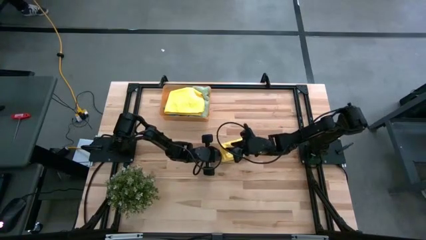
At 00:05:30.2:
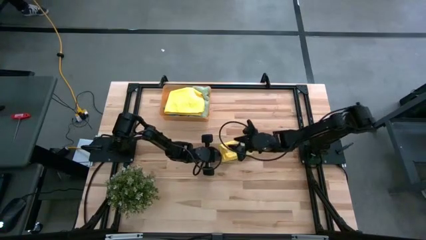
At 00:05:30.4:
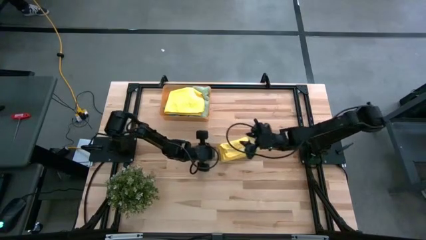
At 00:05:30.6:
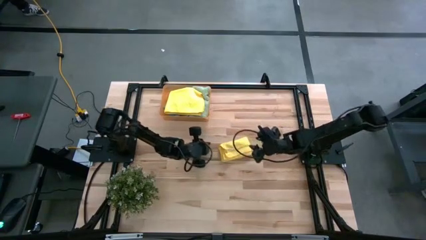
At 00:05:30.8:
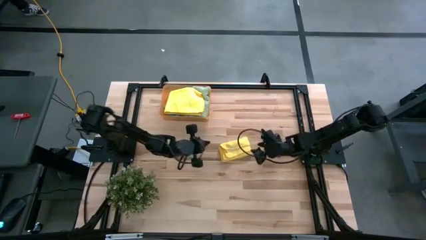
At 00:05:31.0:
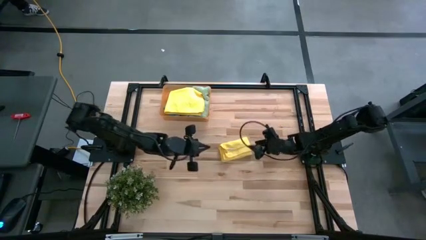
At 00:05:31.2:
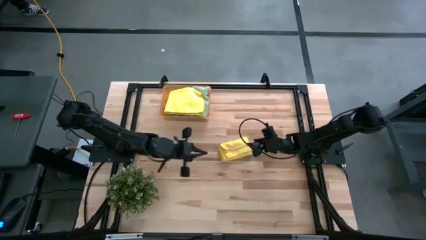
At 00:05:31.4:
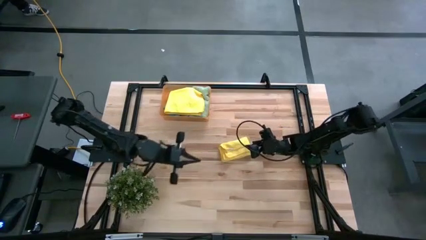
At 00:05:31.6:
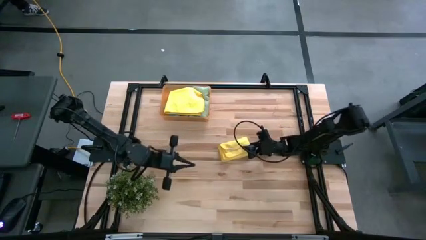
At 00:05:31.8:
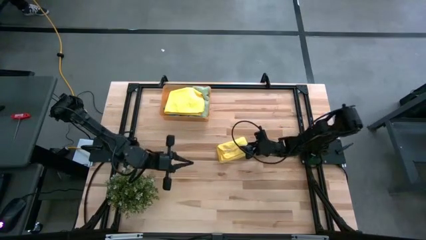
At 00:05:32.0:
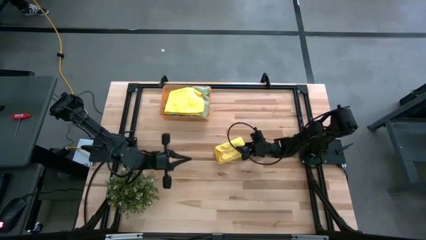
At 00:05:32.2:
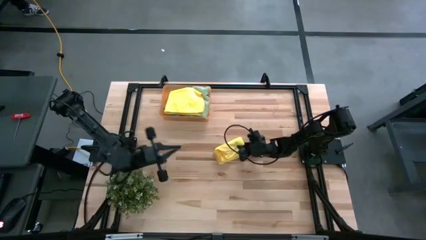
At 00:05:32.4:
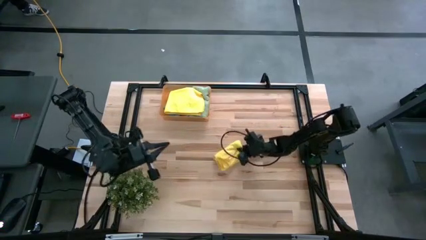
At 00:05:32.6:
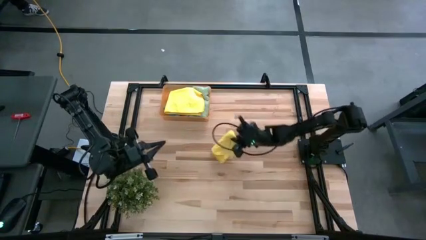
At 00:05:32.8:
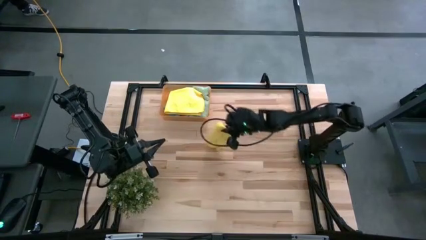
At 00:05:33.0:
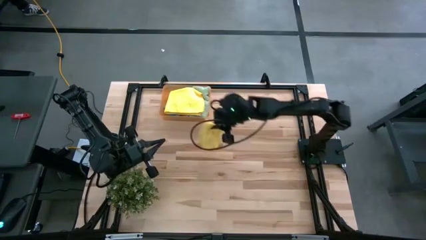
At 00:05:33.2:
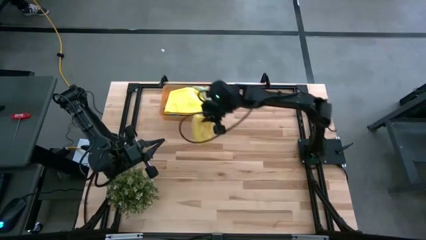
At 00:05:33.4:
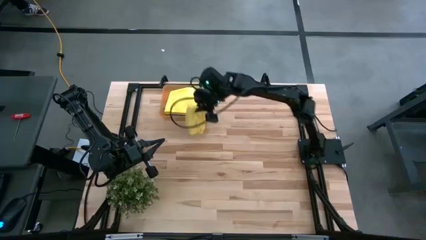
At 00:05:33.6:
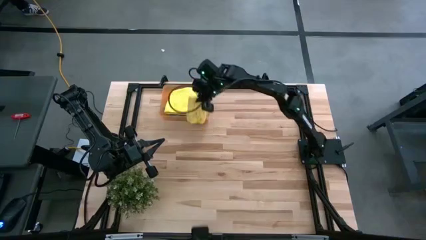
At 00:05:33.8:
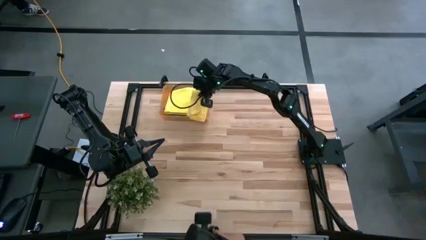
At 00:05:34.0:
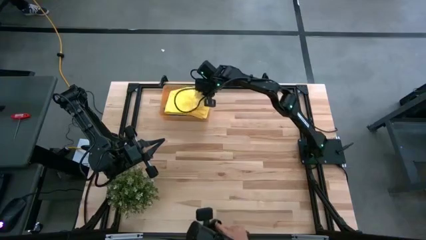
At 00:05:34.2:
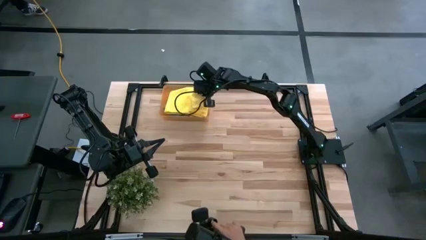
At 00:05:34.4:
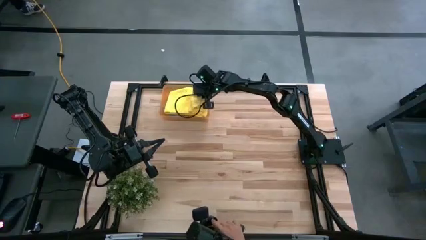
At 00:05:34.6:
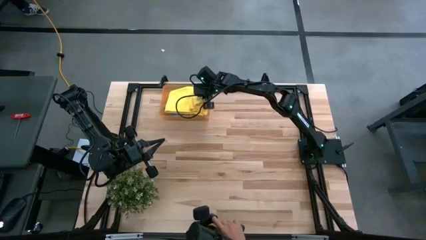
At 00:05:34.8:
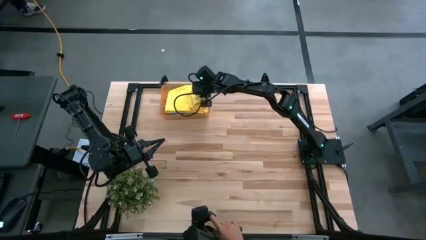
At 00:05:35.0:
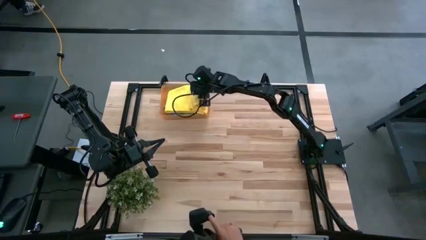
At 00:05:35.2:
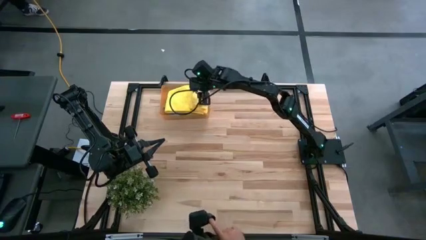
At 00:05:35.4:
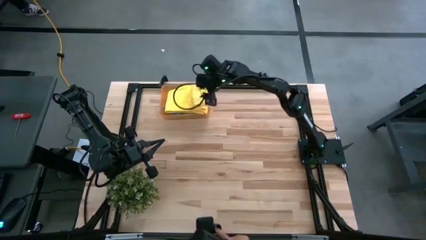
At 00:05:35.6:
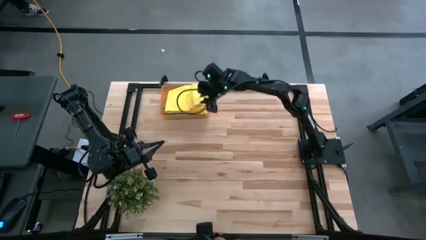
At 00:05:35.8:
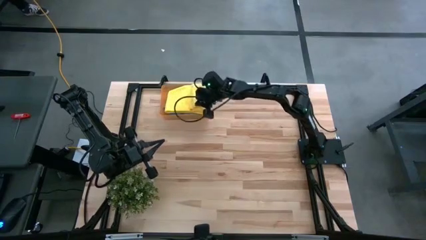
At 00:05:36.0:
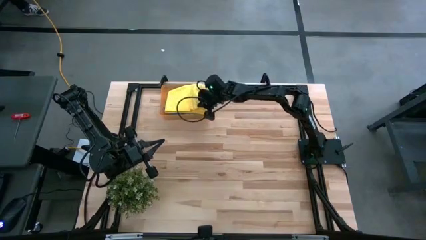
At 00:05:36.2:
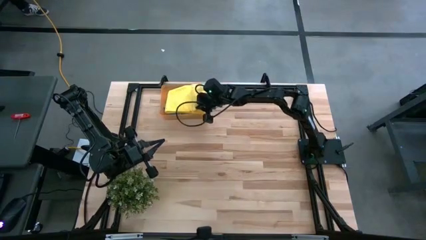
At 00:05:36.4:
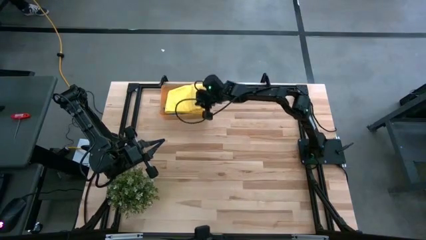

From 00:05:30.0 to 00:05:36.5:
Task: Fold microfiber towels
Put the yellow microfiber cloth into the orange bin

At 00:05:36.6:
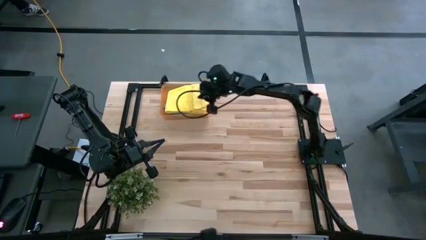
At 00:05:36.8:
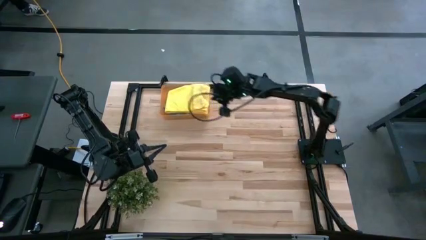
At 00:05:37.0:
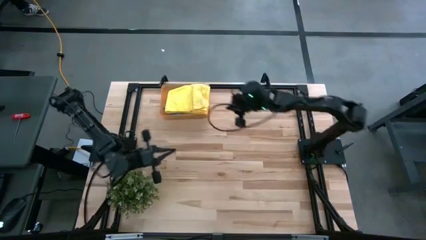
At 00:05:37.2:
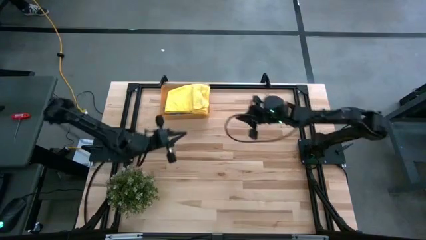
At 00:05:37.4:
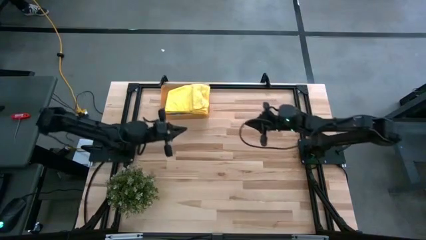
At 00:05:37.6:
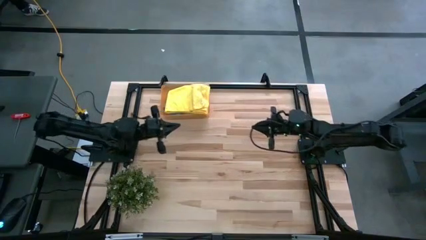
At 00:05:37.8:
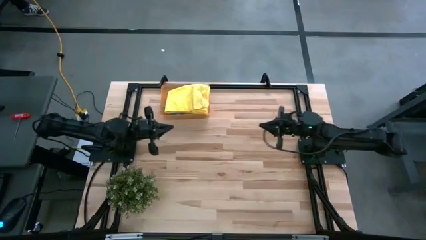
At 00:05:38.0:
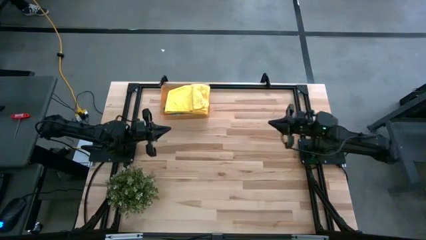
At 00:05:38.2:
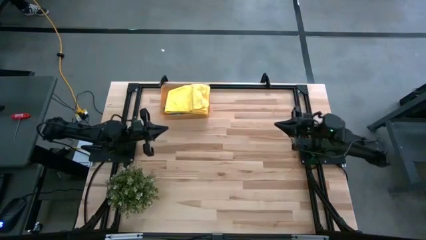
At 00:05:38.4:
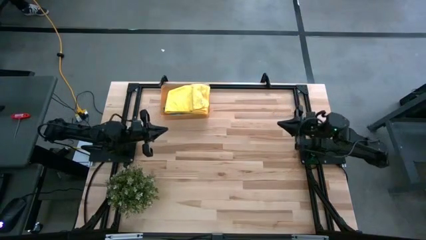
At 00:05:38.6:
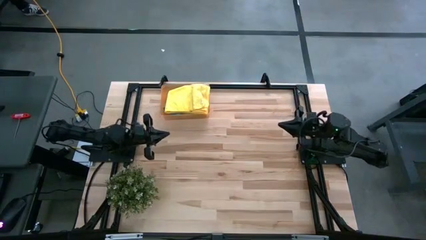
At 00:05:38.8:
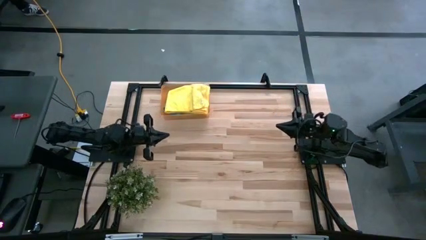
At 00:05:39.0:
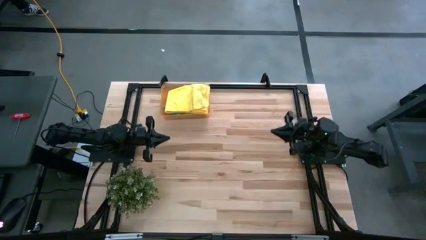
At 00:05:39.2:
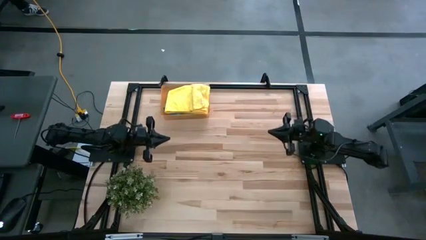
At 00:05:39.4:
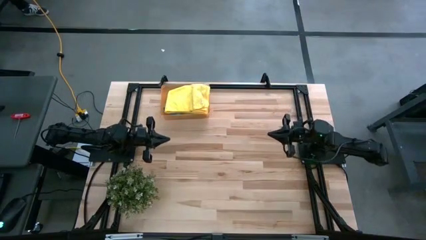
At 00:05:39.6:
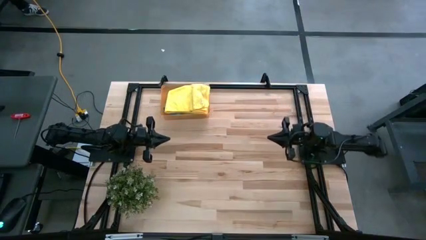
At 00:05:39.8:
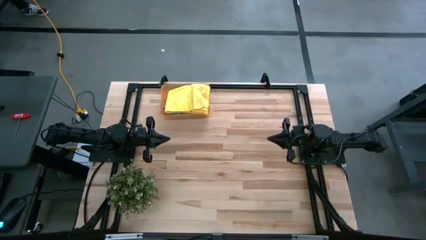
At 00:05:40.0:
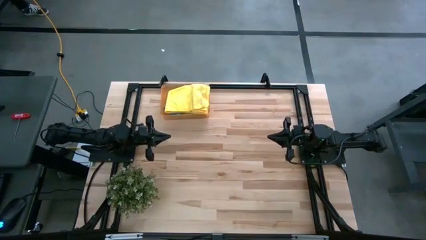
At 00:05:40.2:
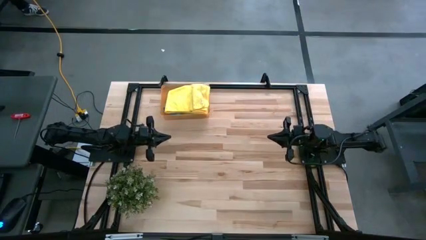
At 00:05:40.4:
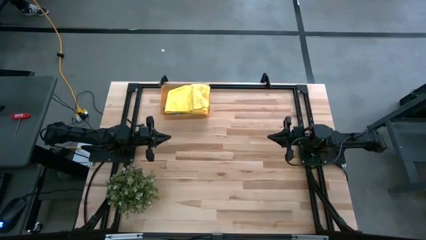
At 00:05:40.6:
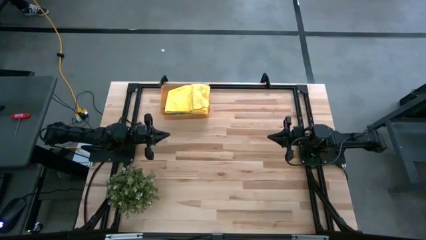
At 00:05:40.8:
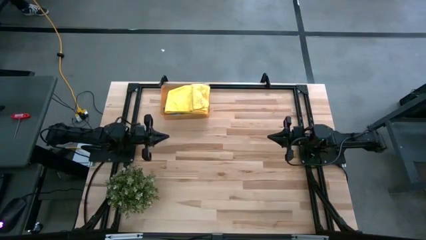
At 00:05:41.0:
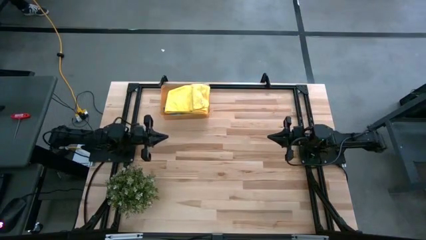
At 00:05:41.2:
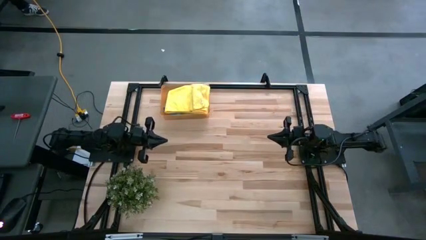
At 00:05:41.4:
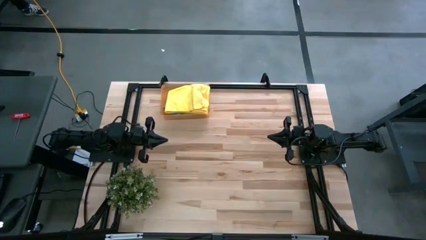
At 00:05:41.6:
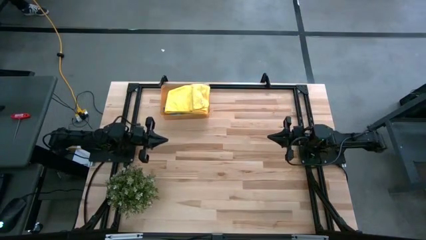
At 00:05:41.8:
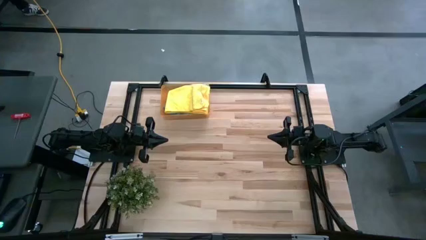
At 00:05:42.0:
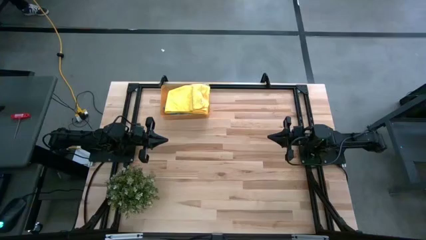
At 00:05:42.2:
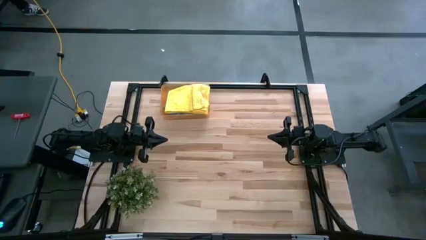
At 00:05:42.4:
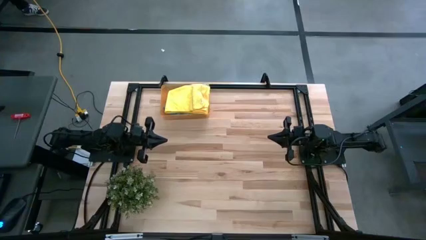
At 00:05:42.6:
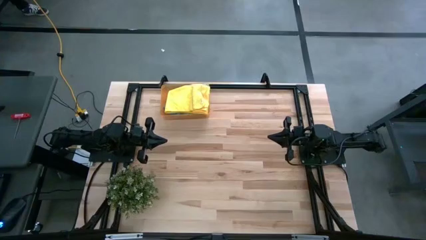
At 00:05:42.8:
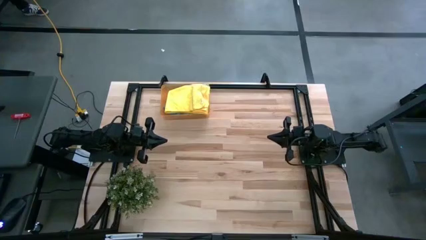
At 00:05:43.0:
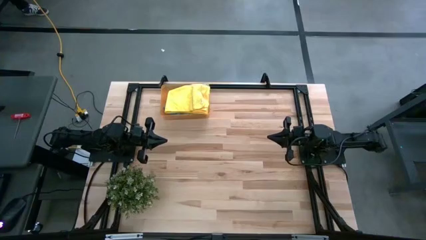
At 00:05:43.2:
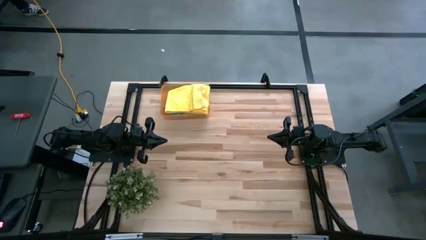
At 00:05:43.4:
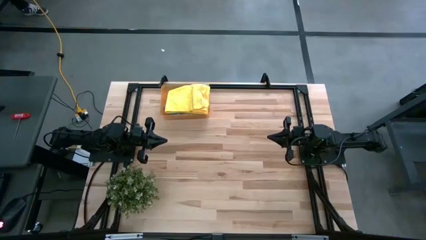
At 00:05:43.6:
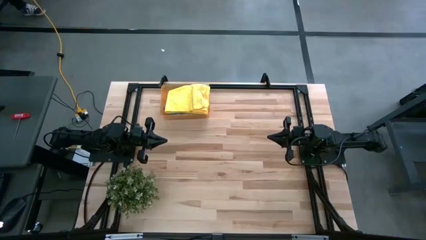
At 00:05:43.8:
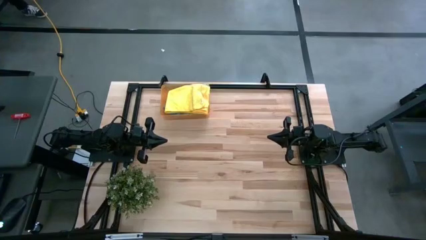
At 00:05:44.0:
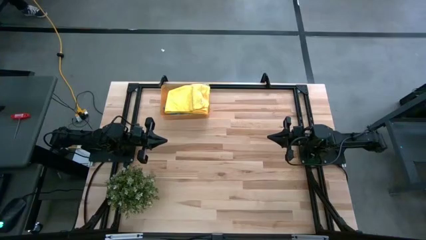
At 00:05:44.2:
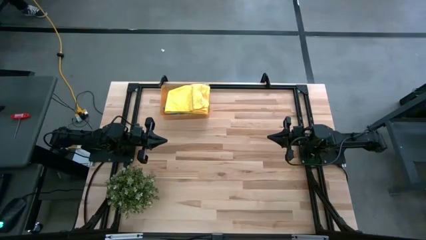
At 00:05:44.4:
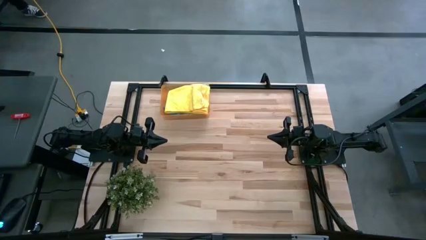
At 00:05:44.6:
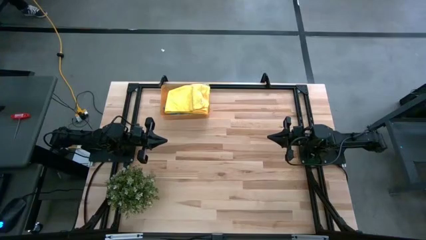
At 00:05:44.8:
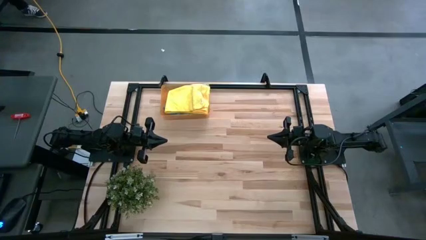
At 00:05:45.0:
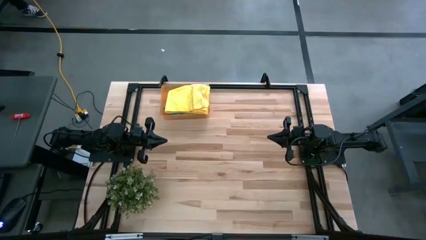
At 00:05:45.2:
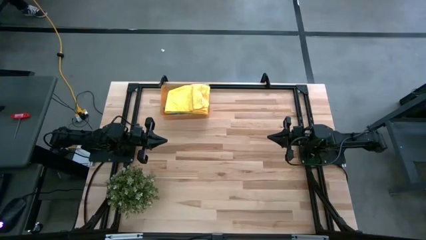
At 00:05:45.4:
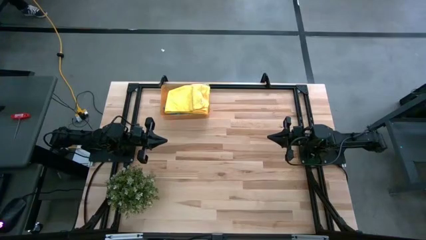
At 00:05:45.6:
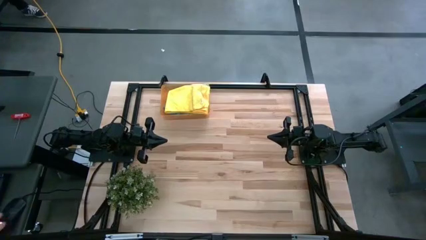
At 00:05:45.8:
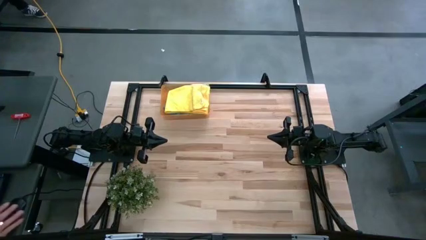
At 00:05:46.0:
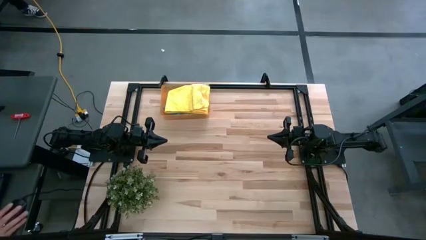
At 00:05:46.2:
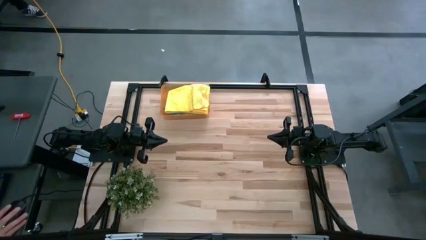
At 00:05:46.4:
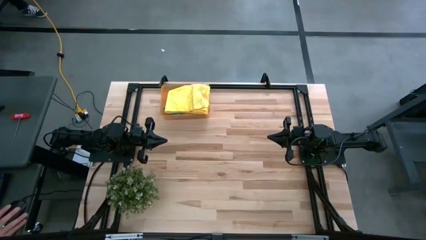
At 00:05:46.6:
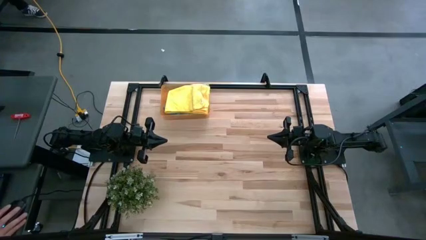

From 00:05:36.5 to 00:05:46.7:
Return to Home Position
